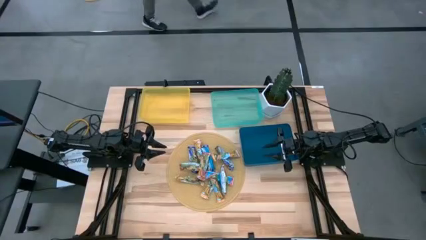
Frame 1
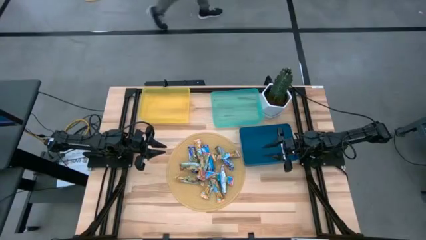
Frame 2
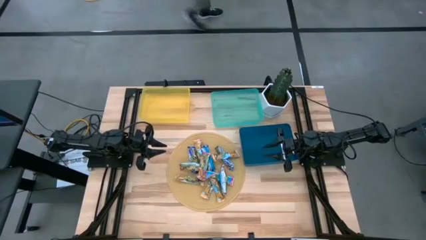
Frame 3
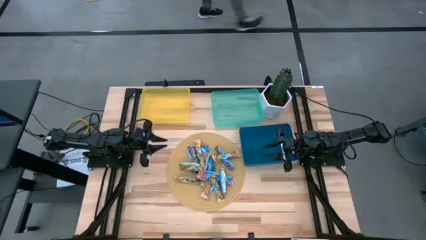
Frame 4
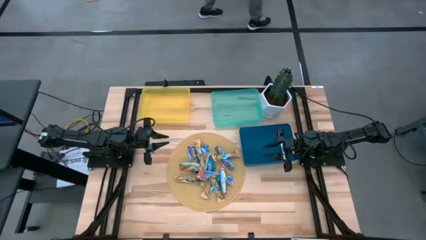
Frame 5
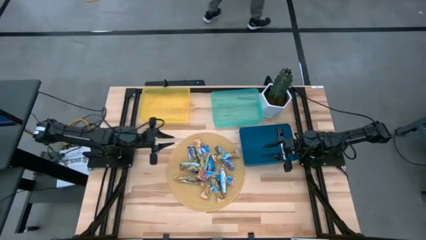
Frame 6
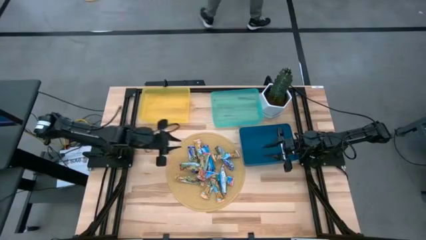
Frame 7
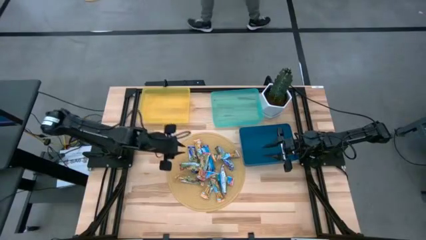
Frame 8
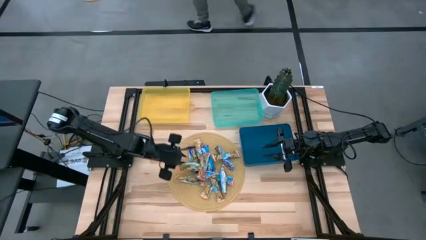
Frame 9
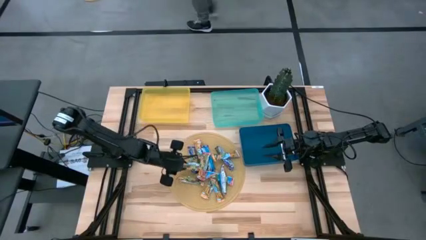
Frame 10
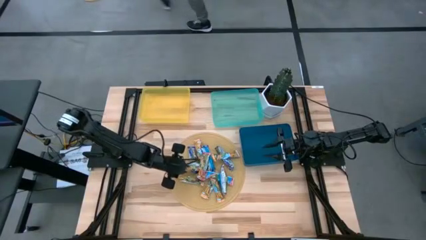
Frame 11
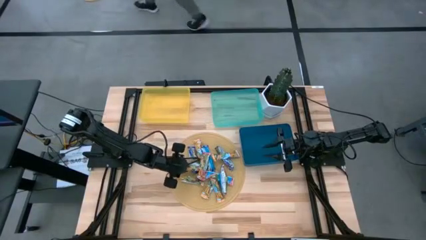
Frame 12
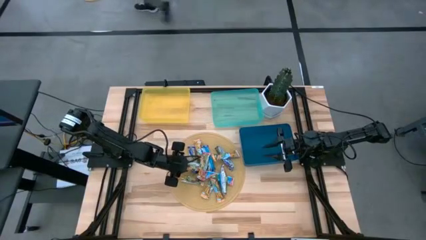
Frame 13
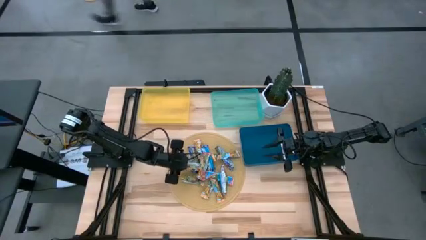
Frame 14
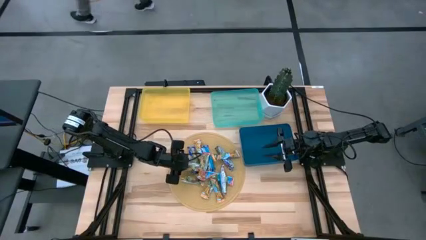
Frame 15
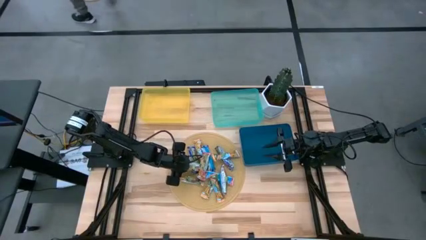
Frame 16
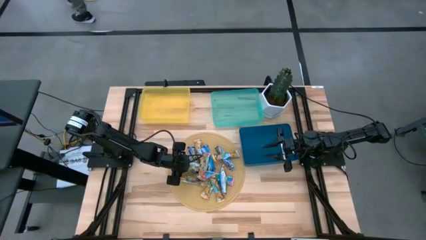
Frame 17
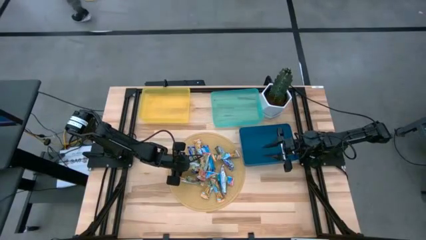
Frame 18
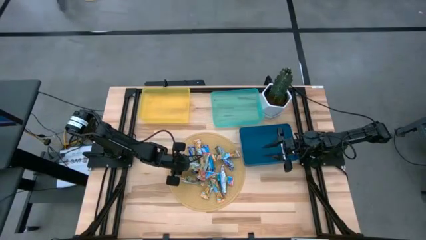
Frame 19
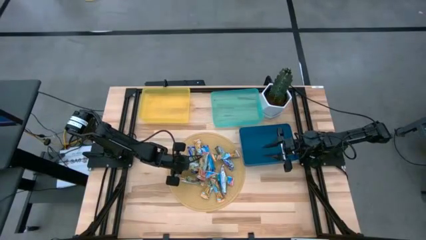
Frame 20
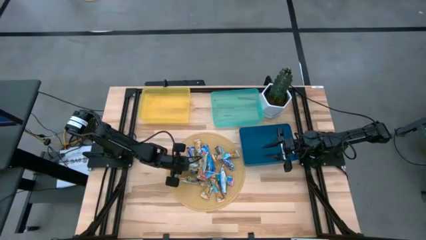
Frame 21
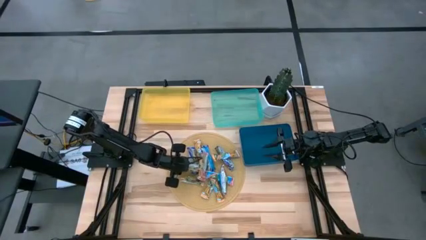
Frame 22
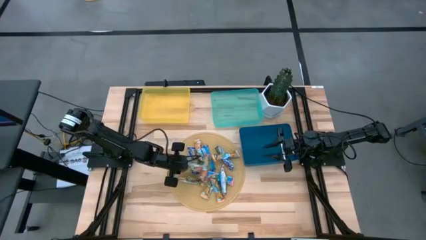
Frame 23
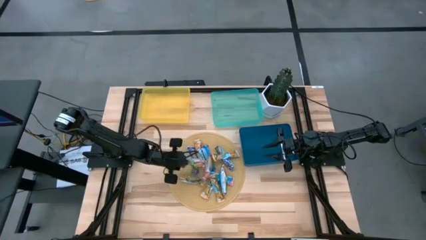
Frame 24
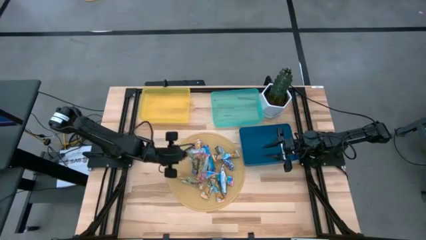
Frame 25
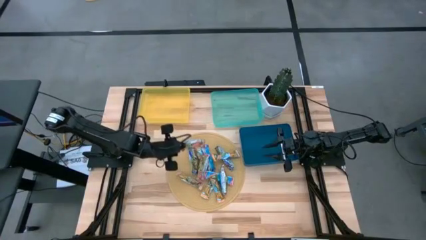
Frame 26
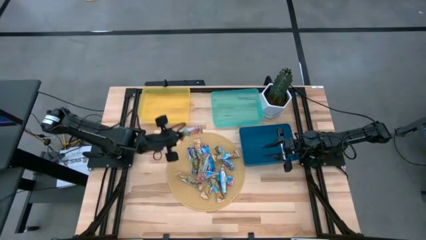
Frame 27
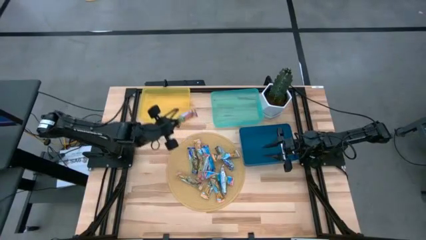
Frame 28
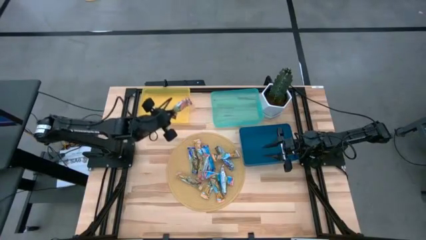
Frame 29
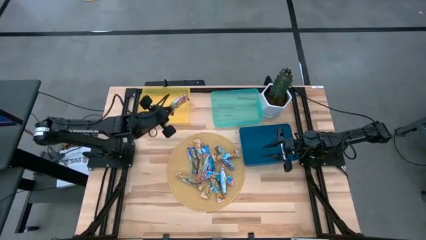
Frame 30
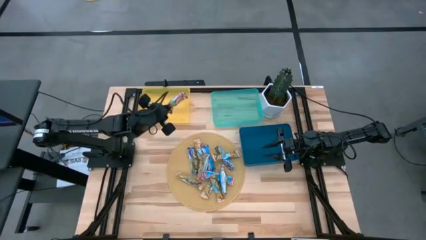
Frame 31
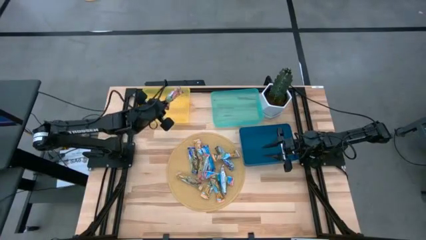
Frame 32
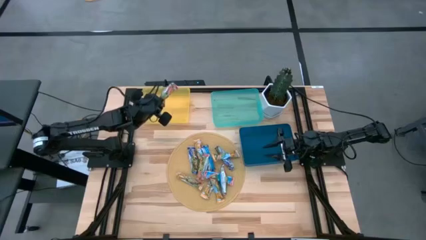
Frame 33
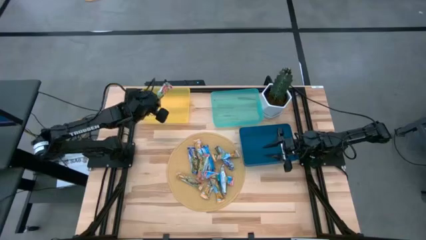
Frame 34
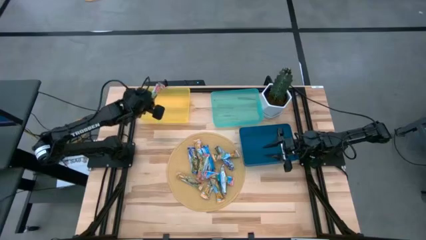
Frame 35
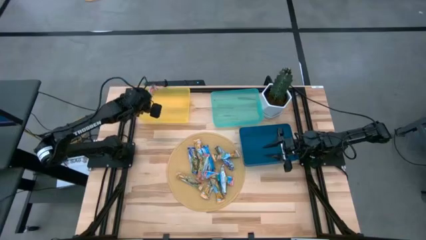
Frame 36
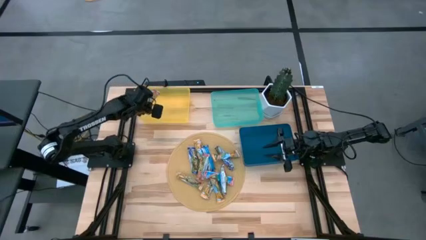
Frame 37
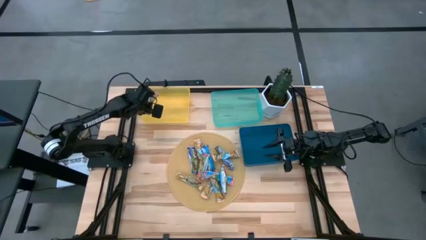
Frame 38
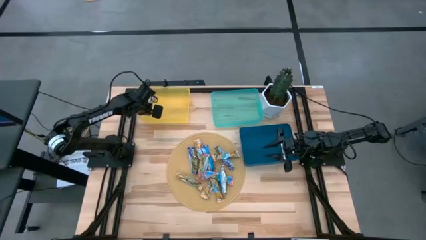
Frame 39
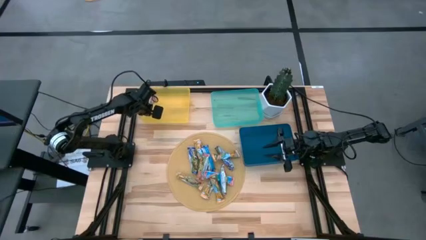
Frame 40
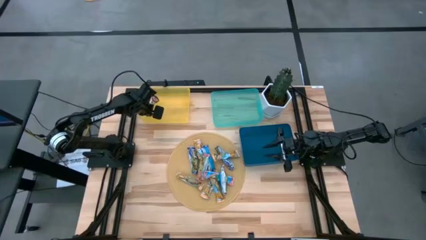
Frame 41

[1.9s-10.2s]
Task: Pick and place Granola Bars by type
Put the red granola bar into the yellow bin

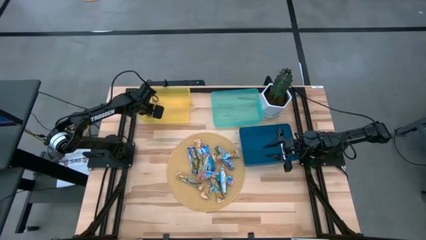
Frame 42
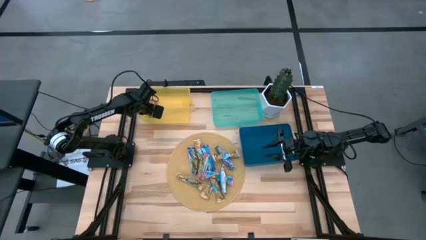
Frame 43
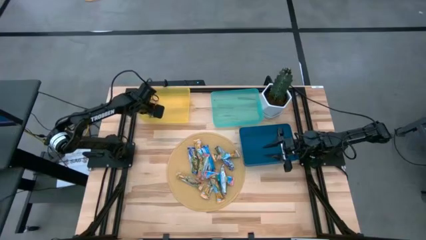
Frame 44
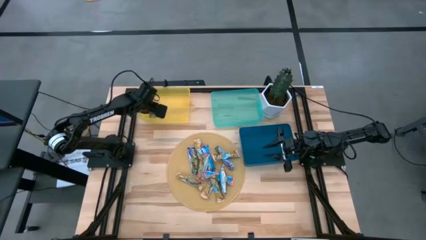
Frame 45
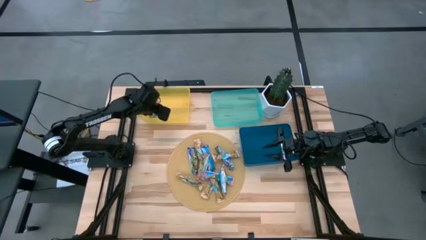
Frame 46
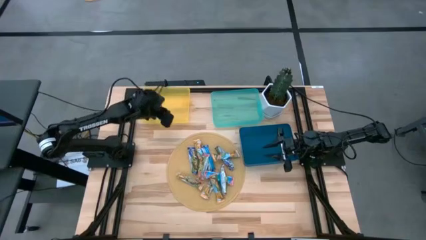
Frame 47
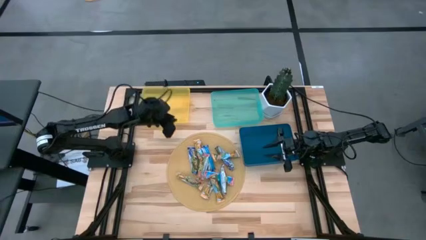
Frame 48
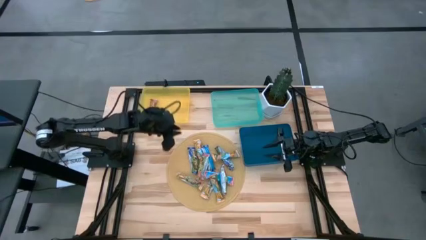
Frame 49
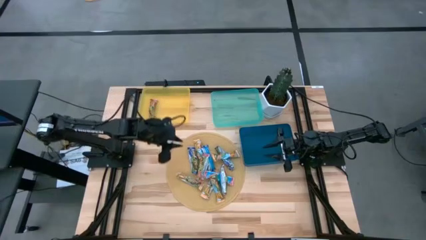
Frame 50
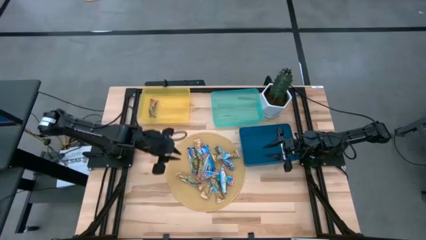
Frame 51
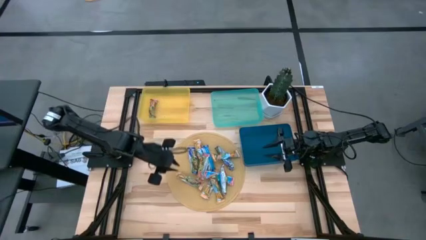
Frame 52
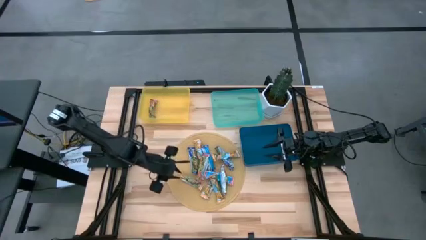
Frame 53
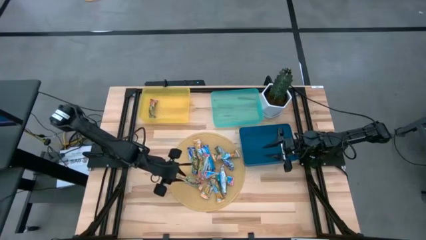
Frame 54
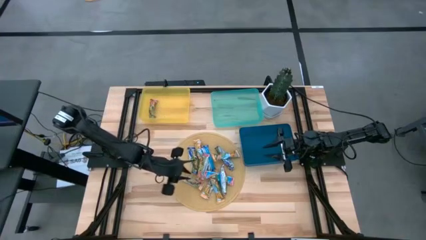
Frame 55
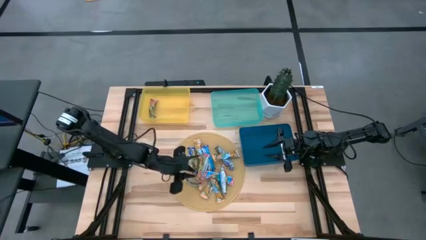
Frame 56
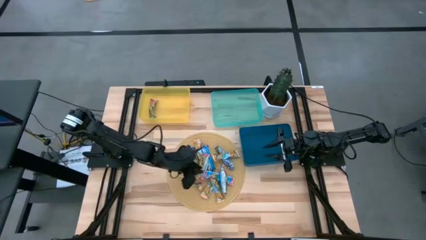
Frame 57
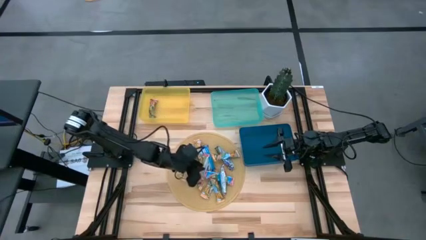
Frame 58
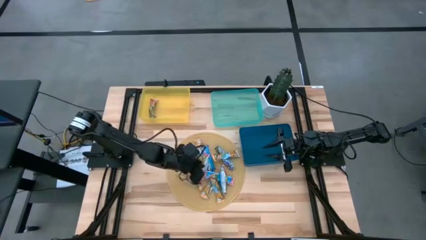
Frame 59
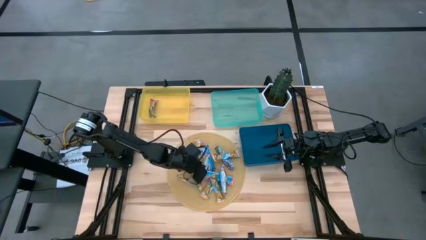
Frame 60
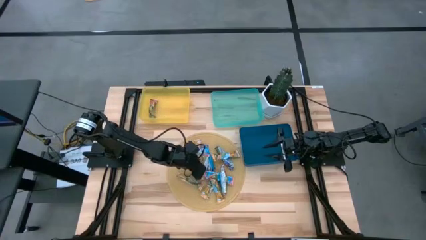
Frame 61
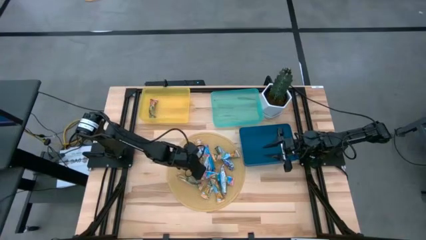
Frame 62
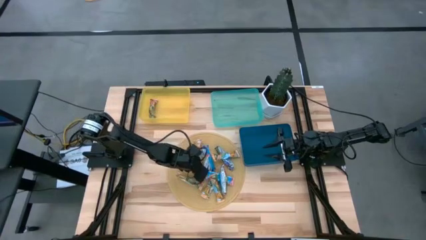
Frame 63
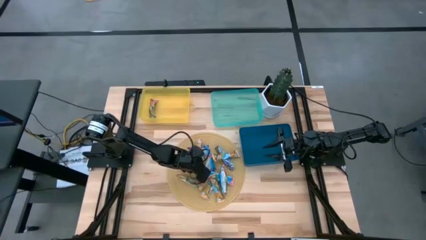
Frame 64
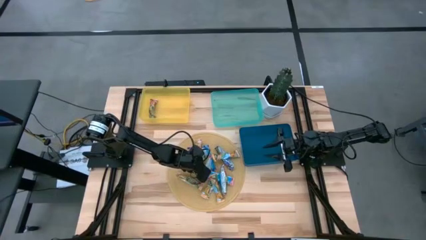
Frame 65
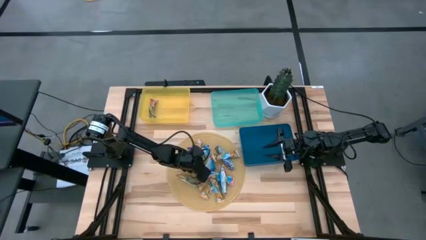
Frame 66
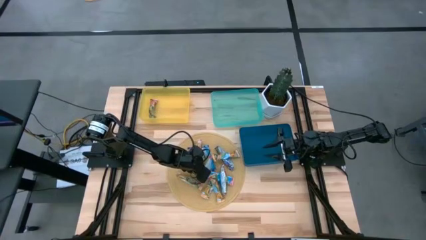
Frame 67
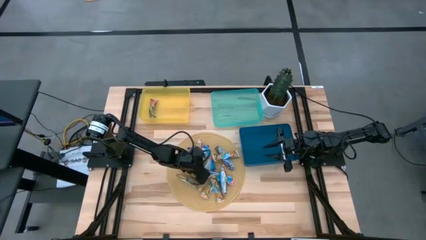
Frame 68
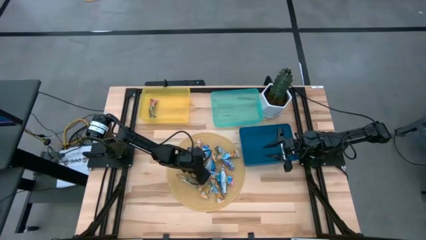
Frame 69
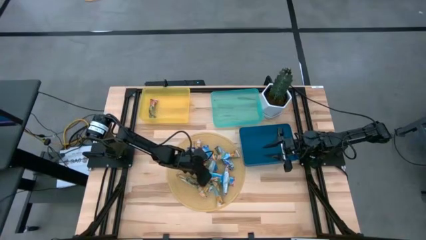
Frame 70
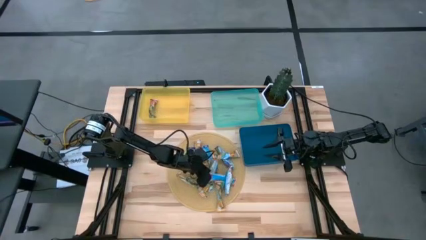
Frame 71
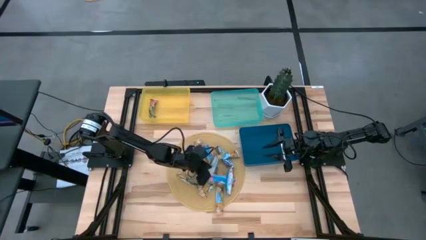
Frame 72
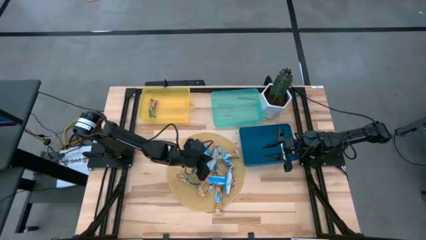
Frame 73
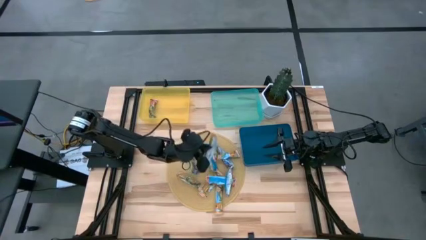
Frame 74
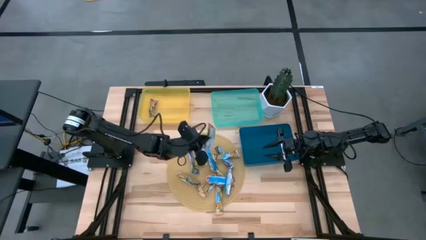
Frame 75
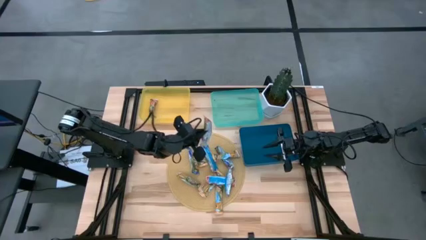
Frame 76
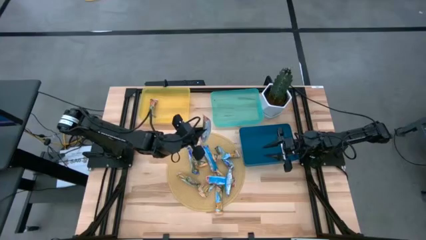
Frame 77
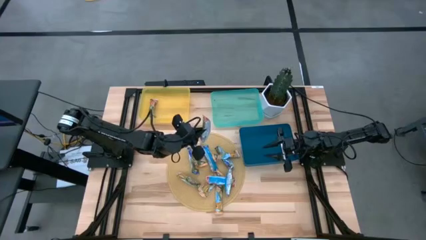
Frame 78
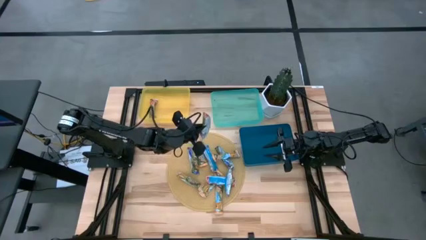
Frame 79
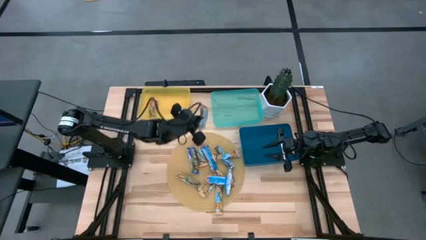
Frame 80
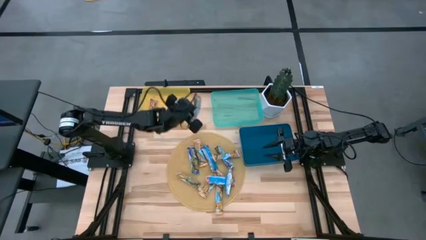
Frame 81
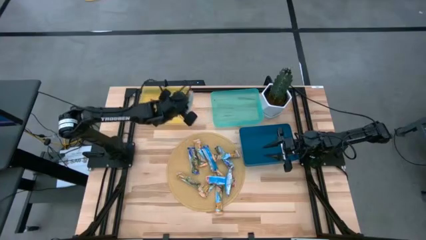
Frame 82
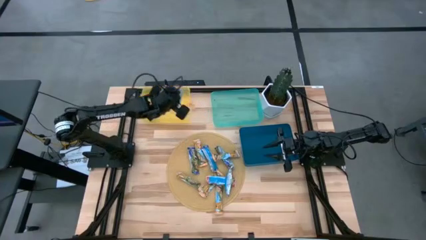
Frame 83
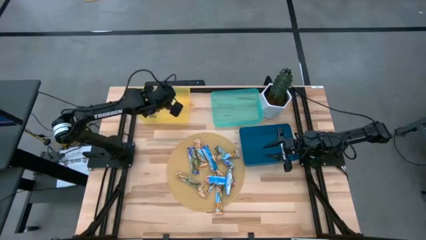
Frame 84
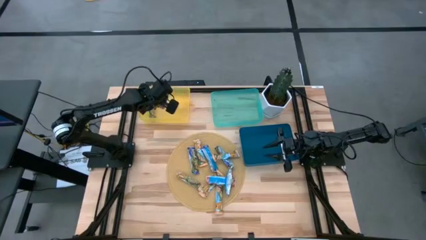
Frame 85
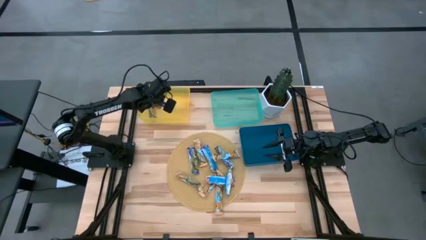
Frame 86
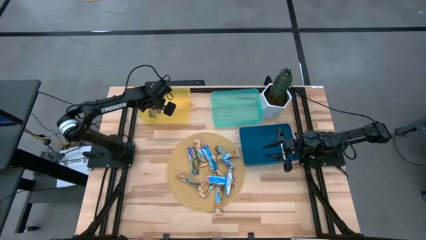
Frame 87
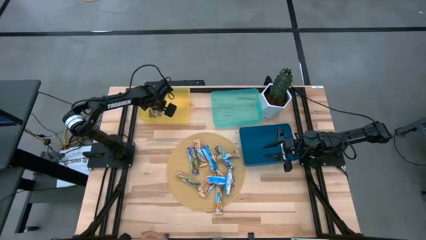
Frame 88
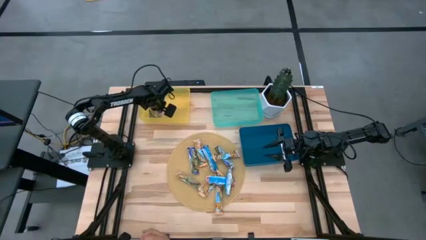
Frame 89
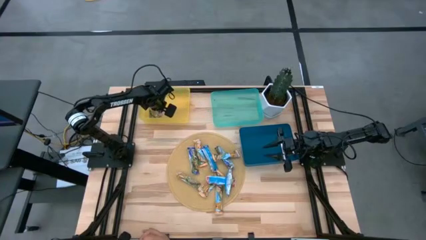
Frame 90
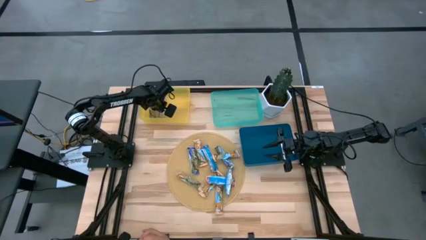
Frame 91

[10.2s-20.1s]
Put the red granola bar into the yellow bin
